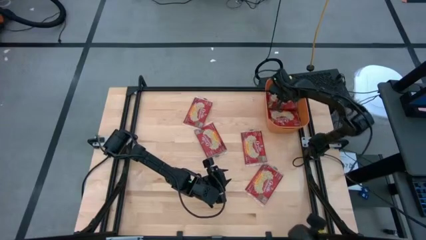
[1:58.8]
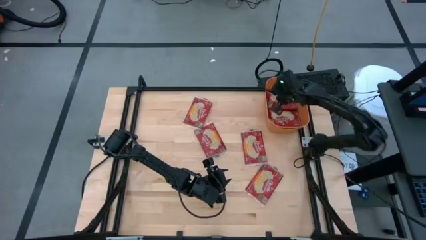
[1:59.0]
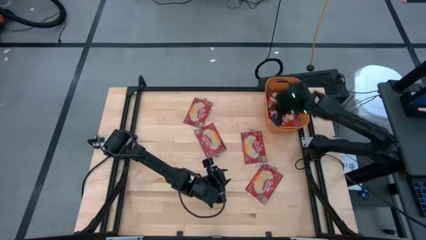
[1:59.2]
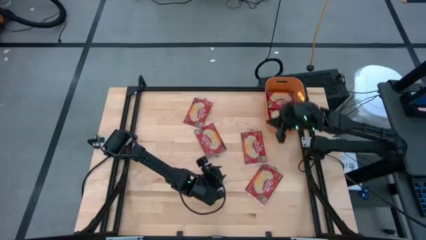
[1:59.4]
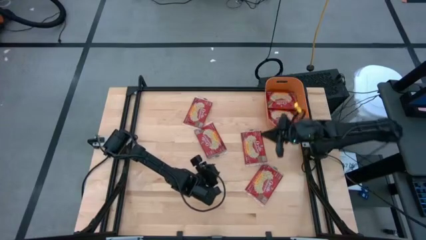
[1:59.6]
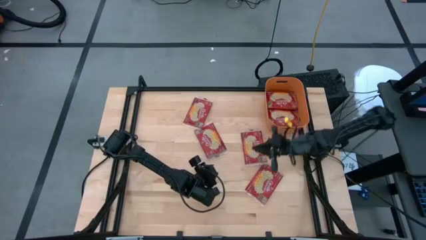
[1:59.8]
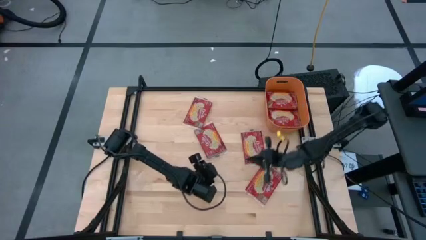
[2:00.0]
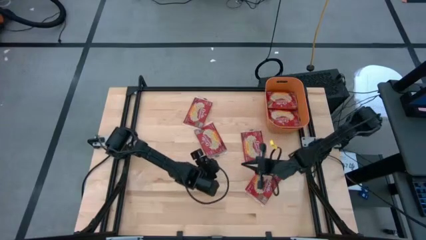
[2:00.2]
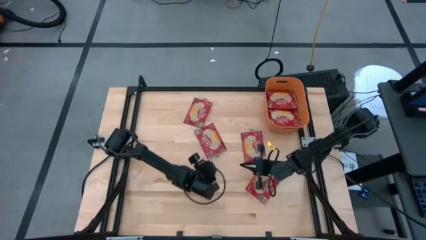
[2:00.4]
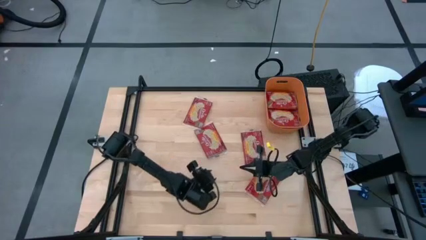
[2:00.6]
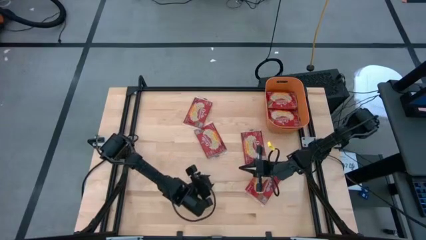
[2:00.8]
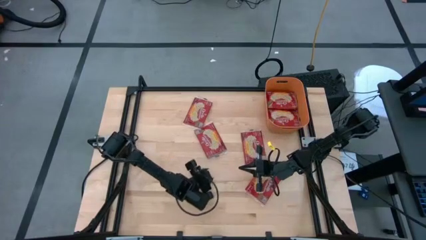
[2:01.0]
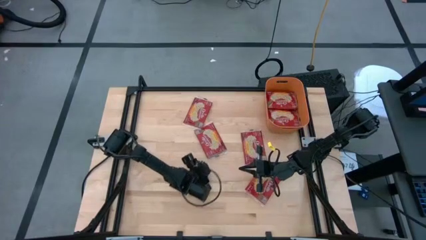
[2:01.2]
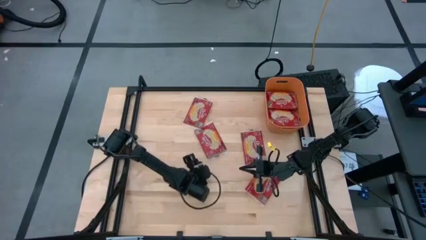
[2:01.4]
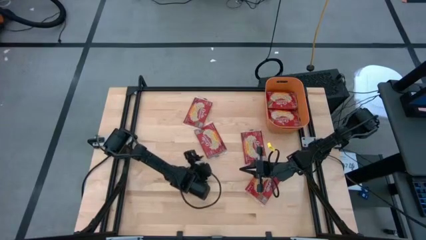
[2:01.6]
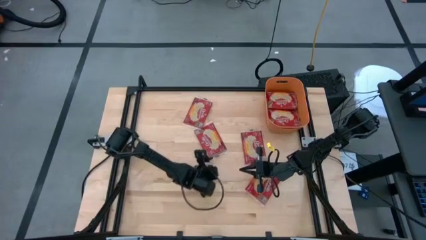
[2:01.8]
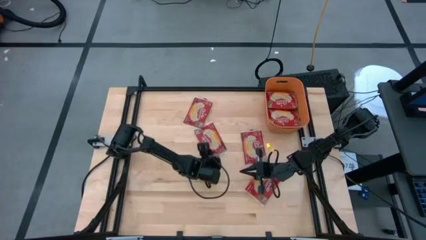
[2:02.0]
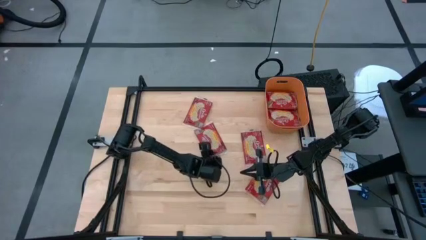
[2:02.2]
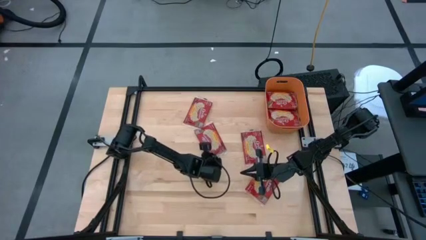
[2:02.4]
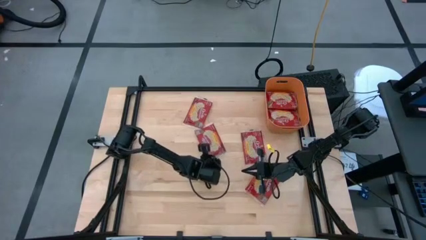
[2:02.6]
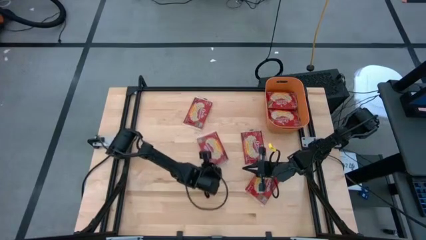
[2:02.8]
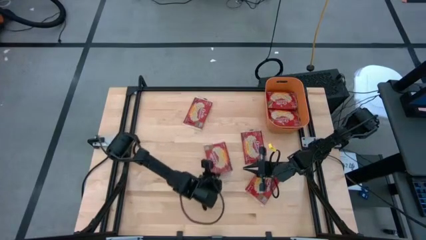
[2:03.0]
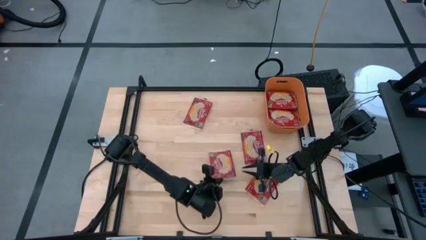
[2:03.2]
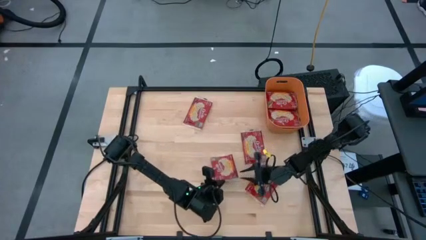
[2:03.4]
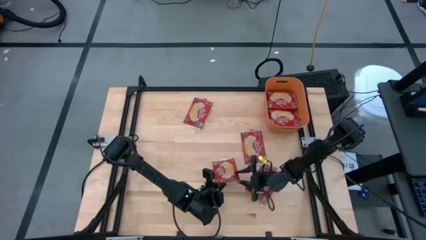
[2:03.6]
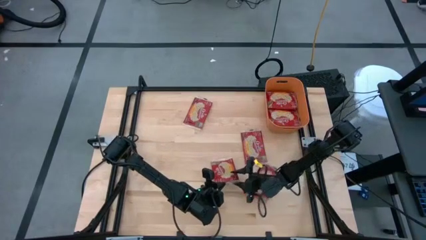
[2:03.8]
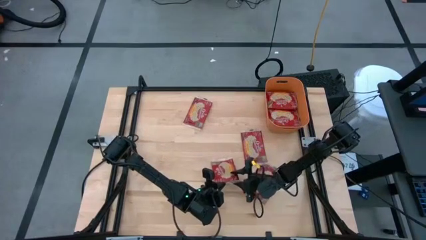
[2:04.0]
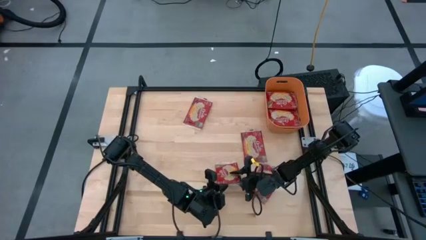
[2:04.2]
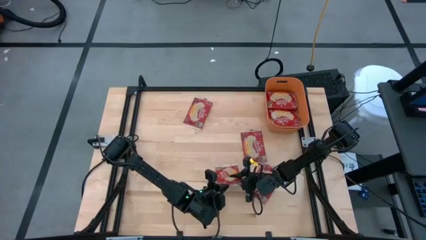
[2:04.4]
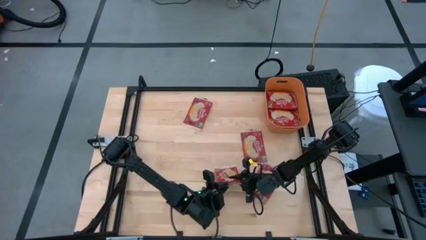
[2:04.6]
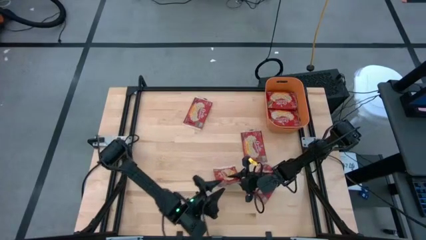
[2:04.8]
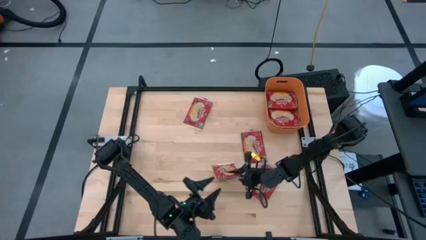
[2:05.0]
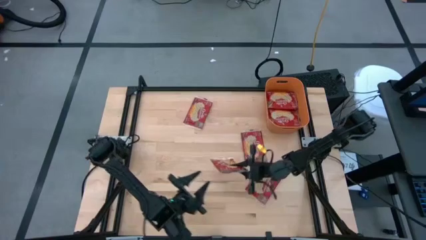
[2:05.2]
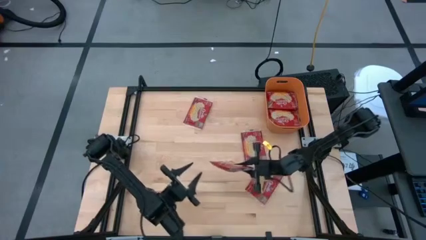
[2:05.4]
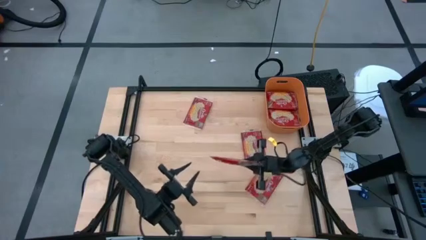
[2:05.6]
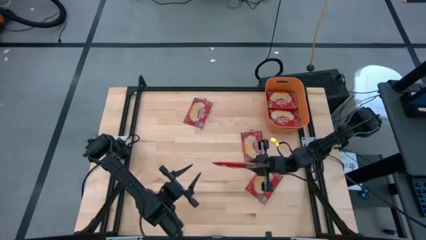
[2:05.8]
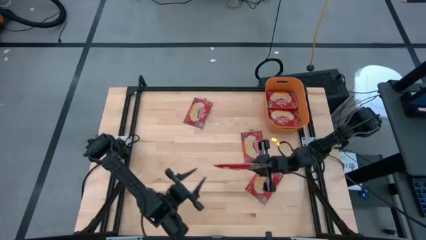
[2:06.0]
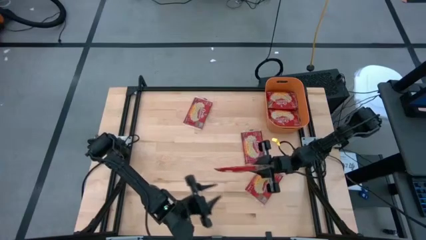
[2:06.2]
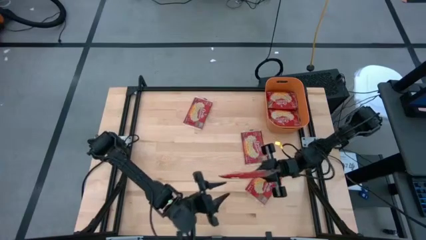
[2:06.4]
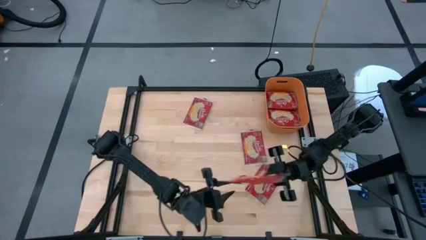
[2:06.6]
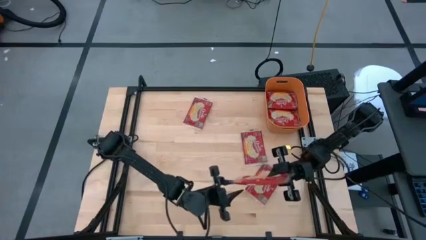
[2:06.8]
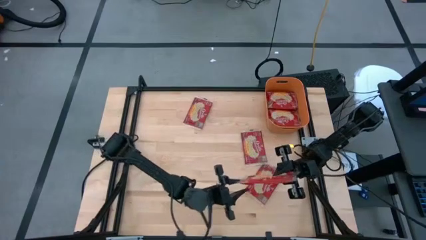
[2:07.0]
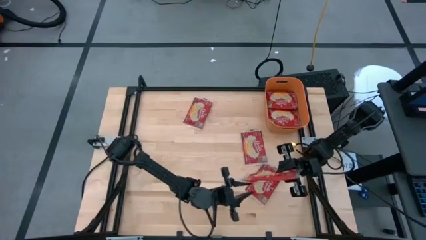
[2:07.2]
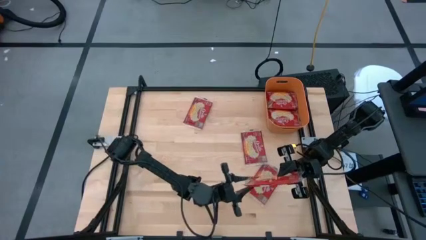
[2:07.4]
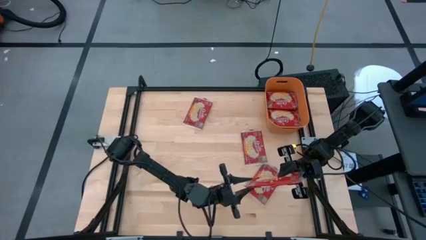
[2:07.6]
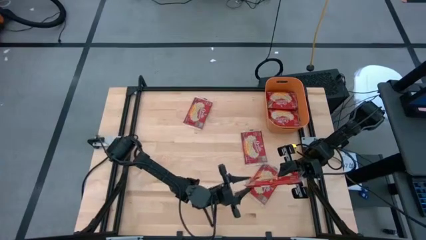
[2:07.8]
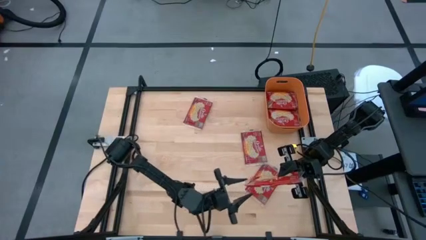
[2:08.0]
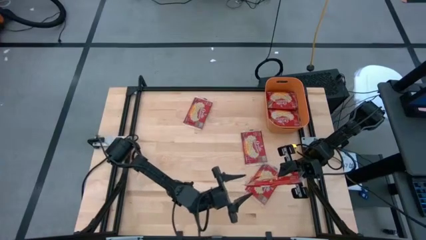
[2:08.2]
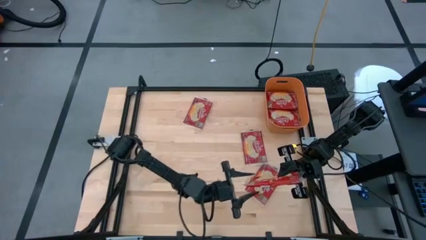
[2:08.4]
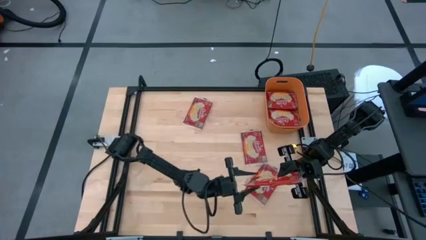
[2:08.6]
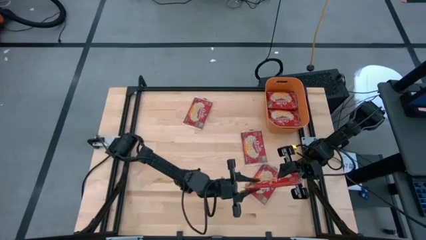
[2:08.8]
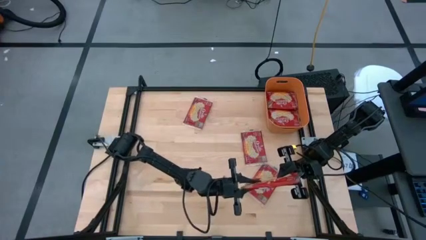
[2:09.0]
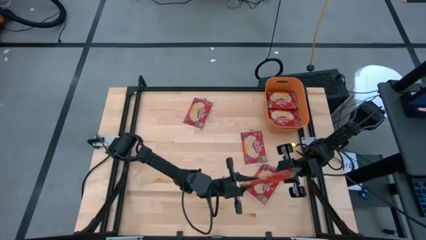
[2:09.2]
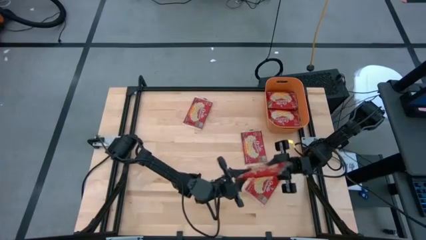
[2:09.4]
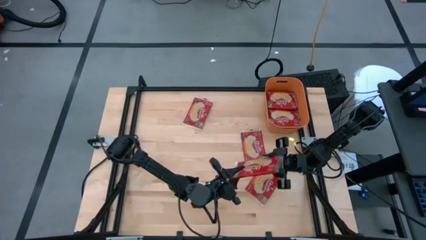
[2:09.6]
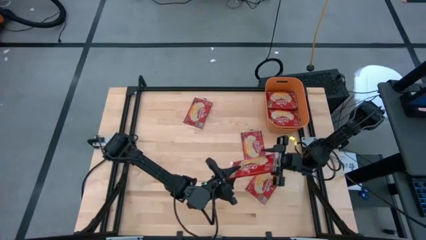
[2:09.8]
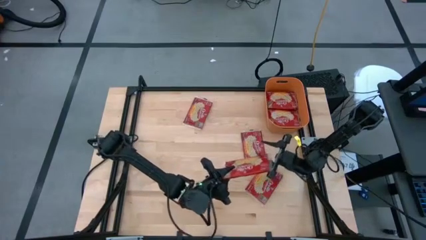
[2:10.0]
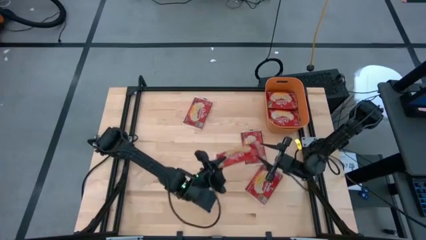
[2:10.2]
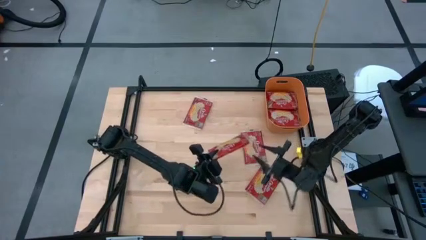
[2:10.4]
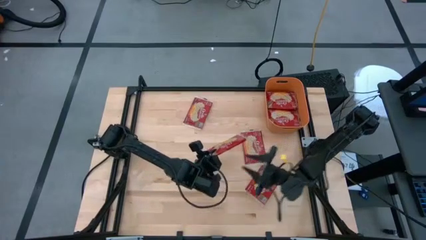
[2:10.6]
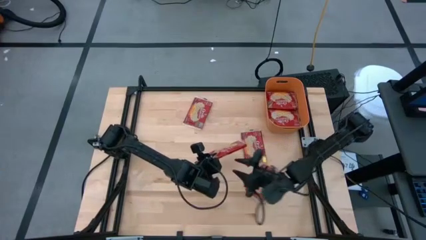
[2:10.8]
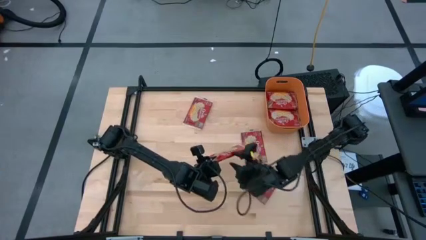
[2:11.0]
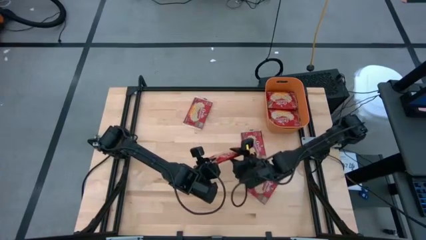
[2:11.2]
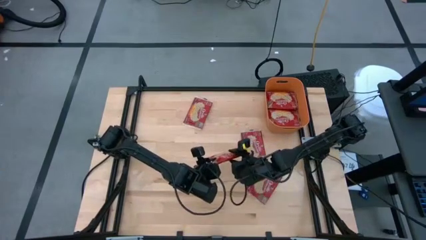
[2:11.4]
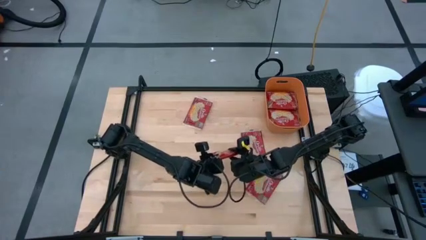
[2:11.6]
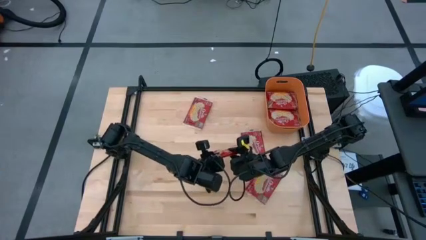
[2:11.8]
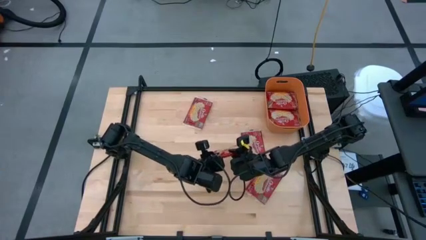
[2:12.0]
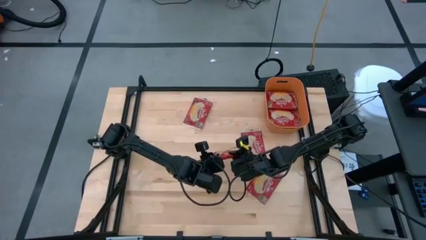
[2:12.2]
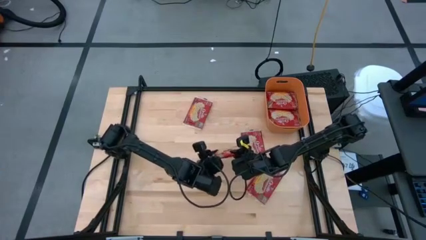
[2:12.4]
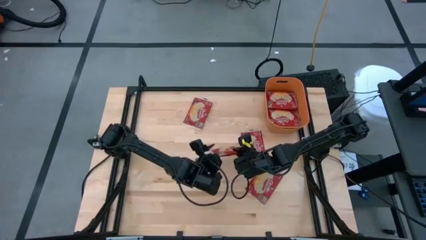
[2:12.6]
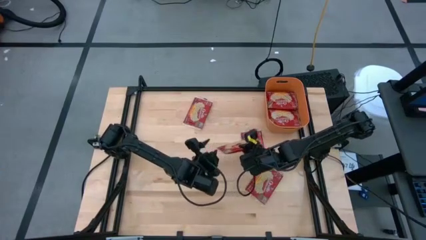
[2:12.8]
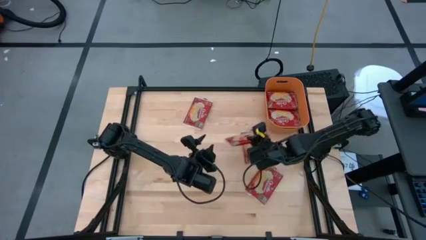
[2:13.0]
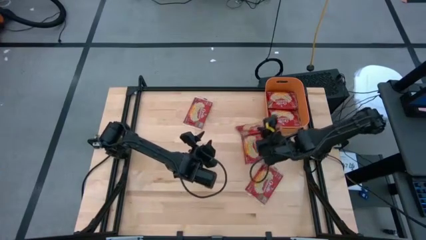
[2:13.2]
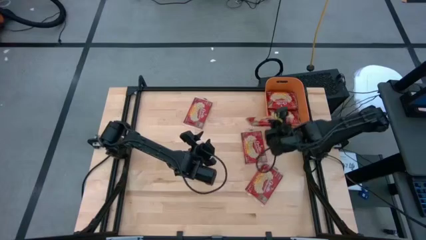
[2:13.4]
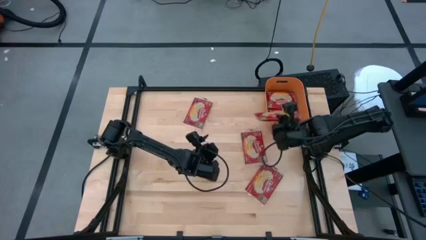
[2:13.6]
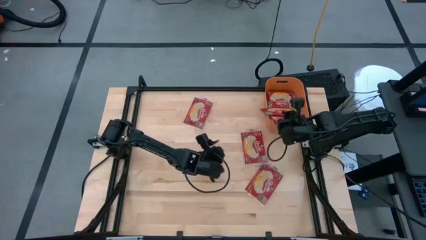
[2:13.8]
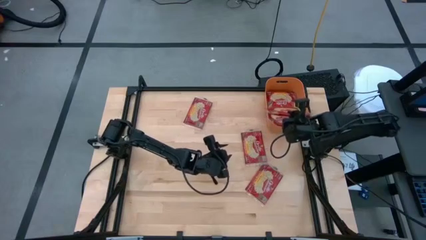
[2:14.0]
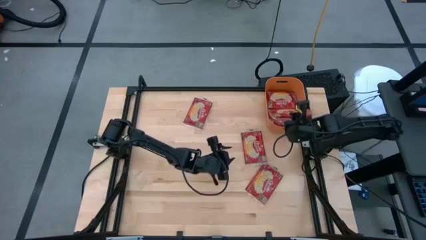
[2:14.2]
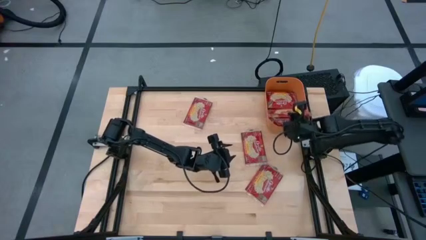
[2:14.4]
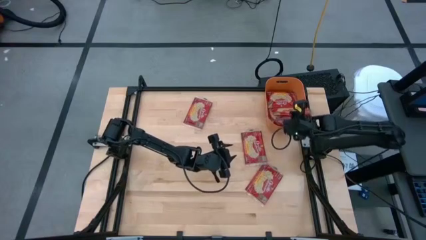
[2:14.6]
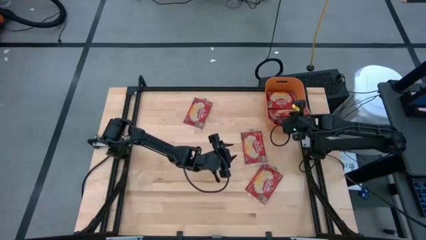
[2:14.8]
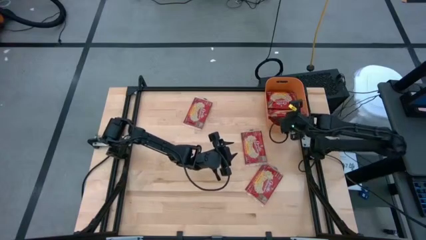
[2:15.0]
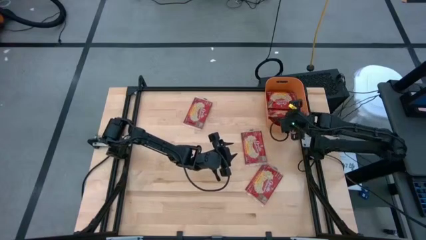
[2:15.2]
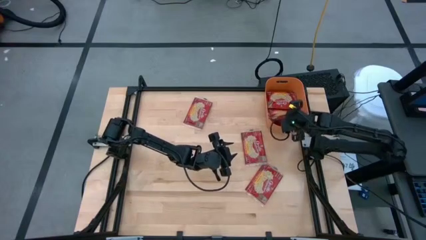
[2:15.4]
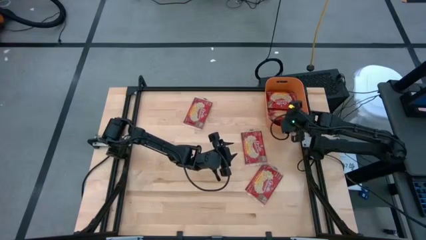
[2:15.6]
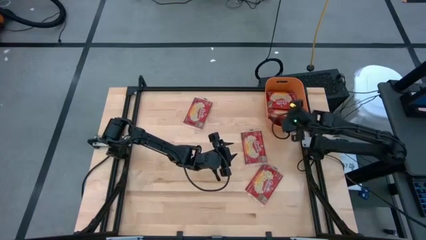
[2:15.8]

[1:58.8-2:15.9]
Task: Sort popcorn bags into baskets
Put the red popcorn bag into the orange container
